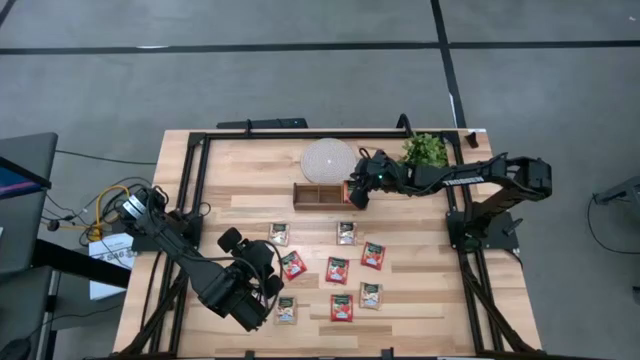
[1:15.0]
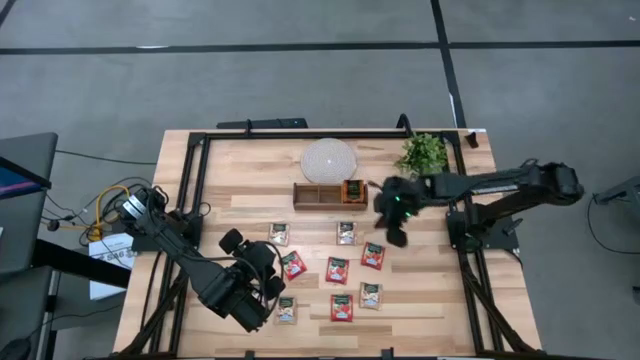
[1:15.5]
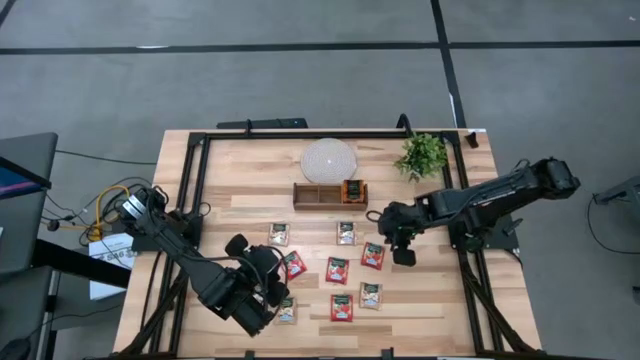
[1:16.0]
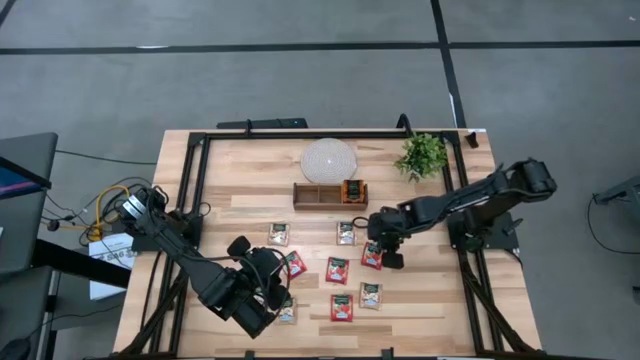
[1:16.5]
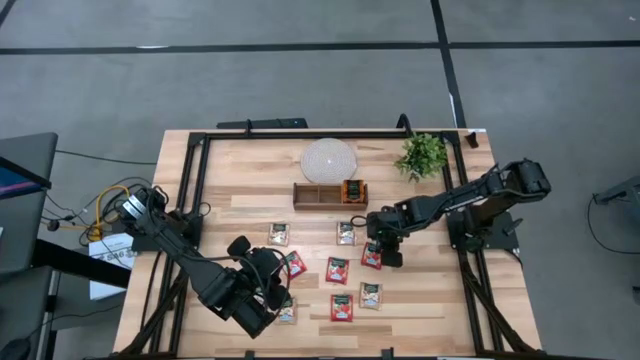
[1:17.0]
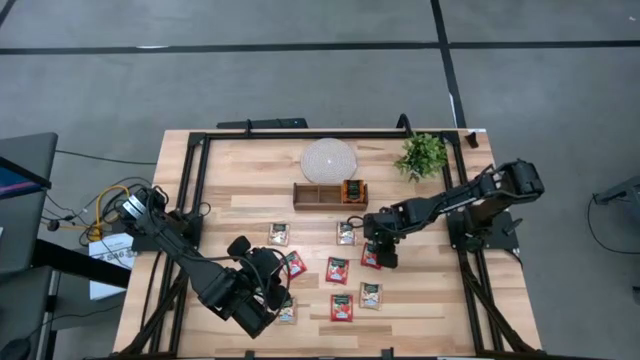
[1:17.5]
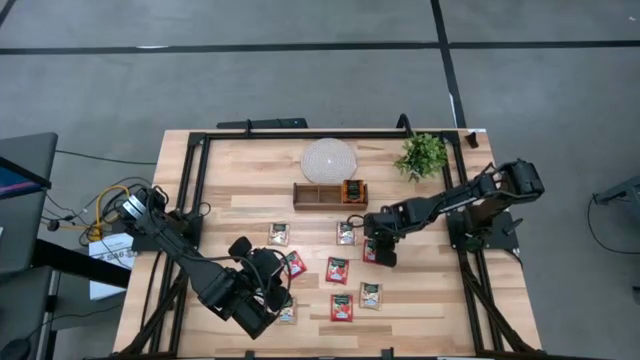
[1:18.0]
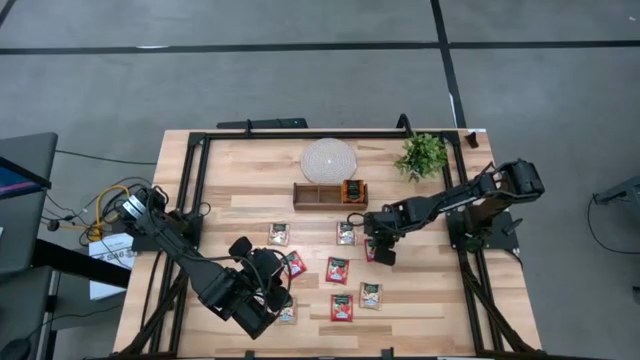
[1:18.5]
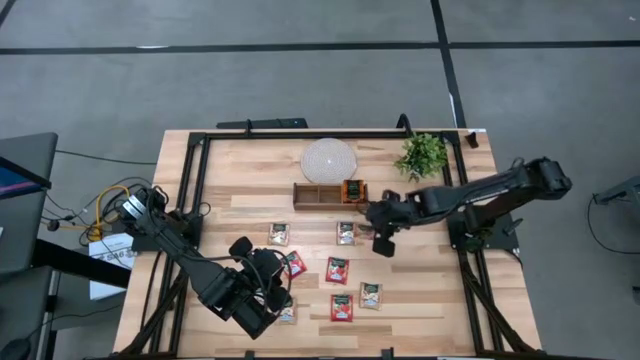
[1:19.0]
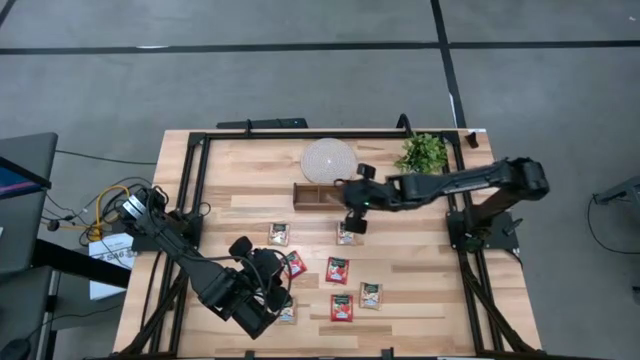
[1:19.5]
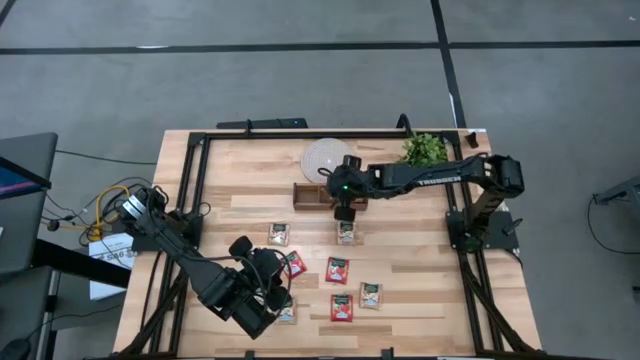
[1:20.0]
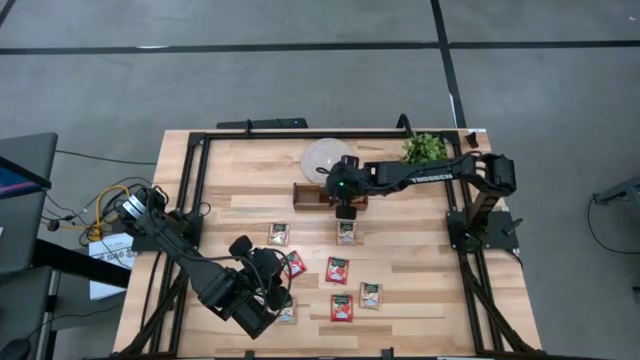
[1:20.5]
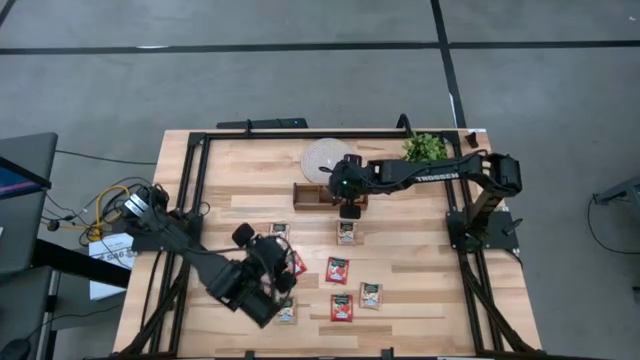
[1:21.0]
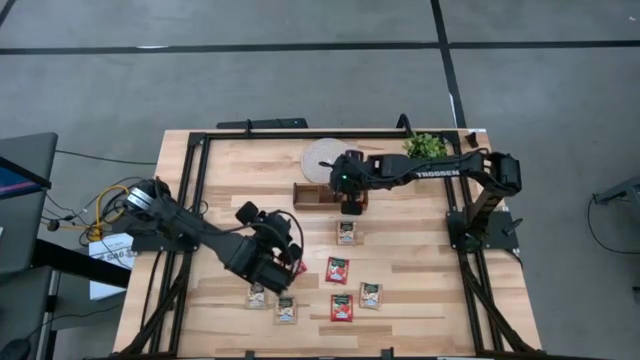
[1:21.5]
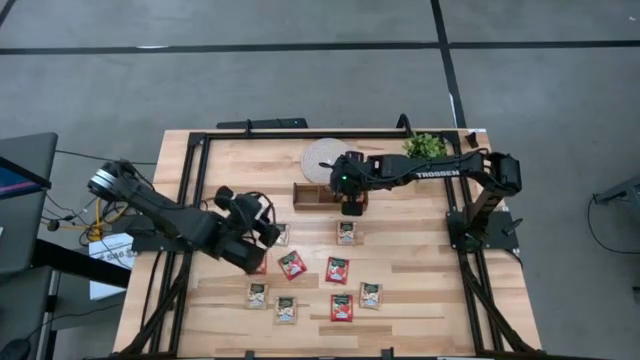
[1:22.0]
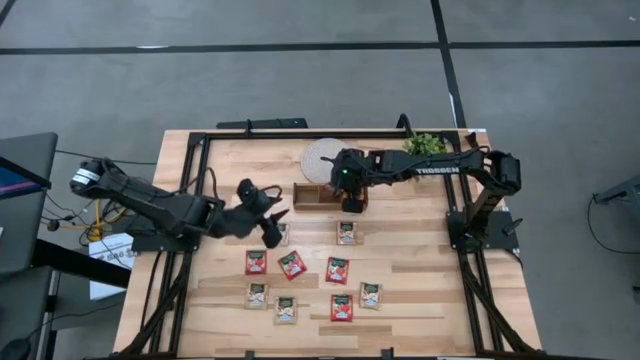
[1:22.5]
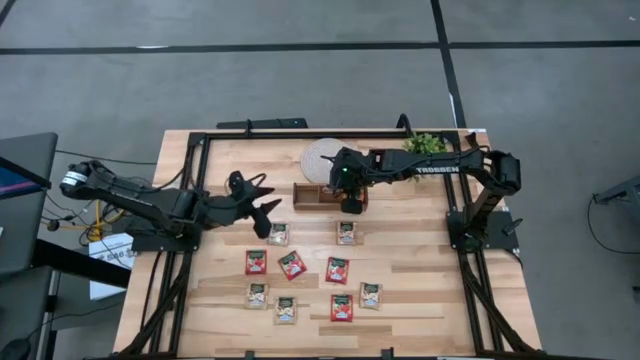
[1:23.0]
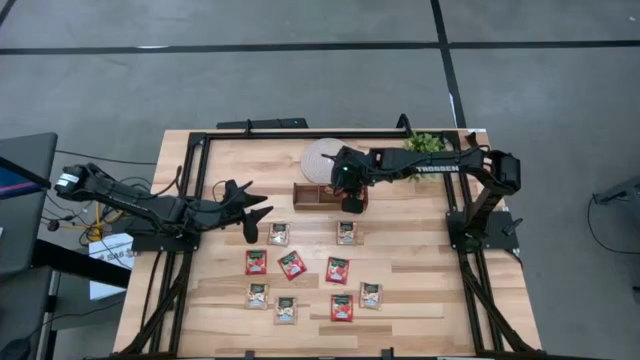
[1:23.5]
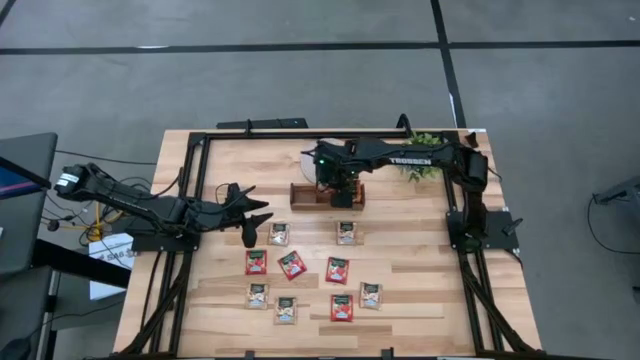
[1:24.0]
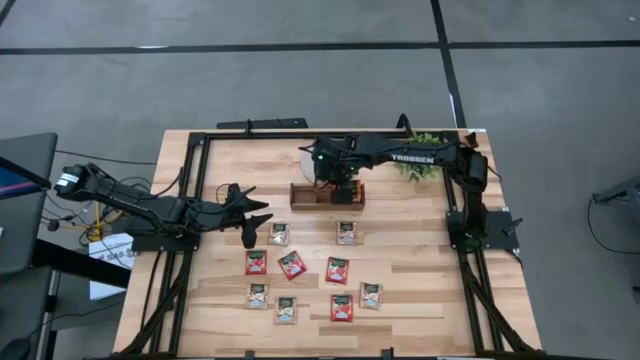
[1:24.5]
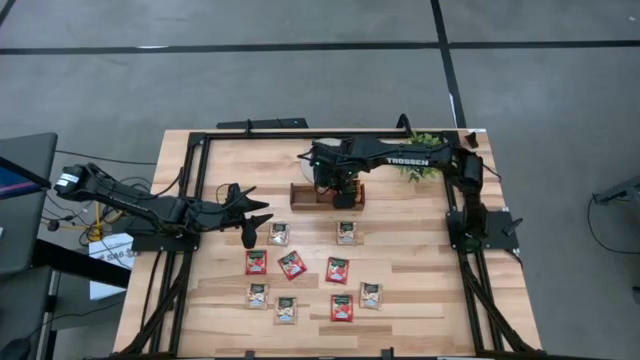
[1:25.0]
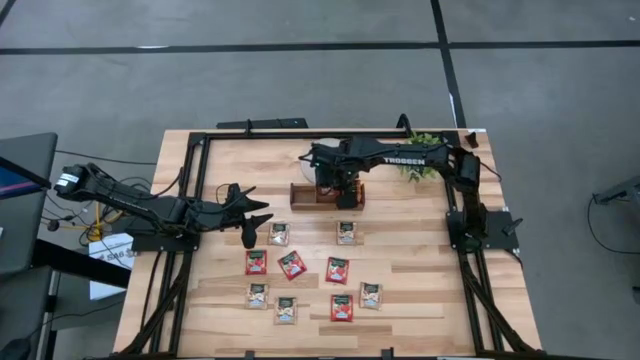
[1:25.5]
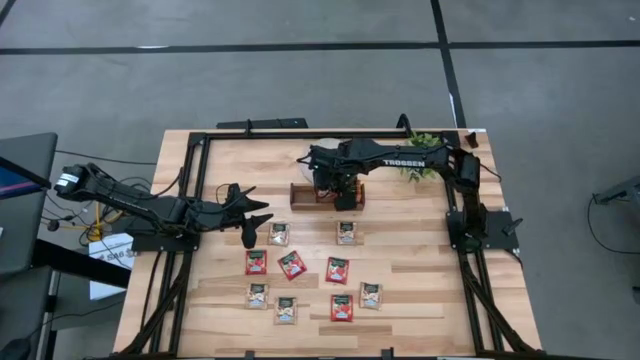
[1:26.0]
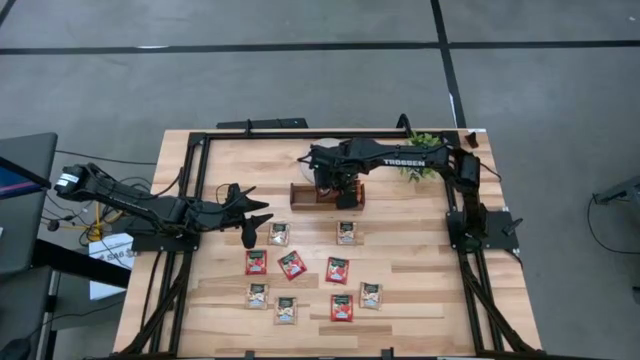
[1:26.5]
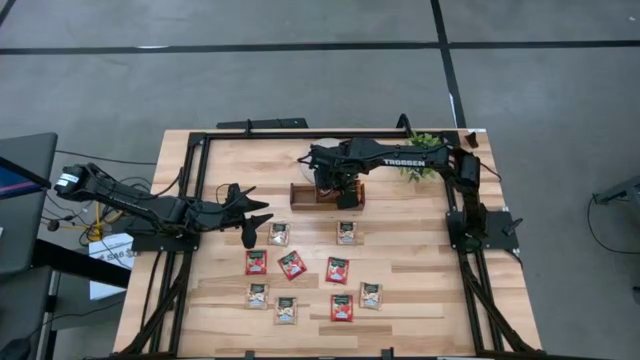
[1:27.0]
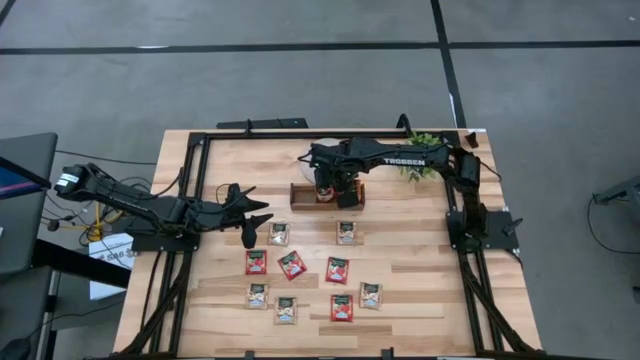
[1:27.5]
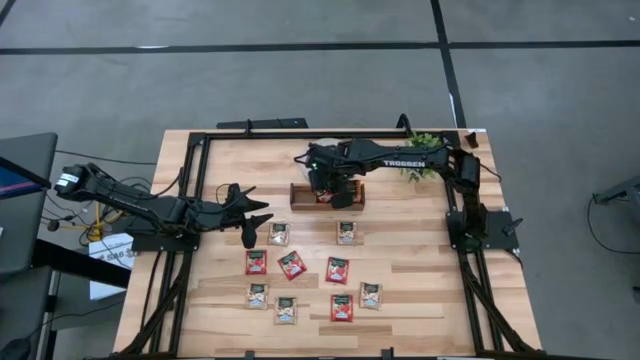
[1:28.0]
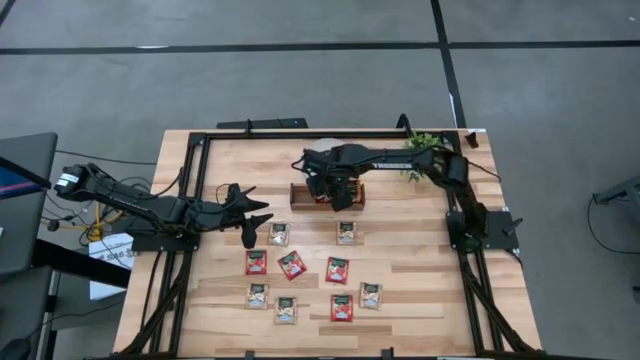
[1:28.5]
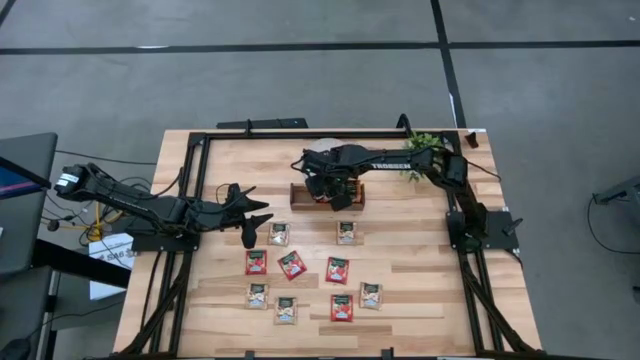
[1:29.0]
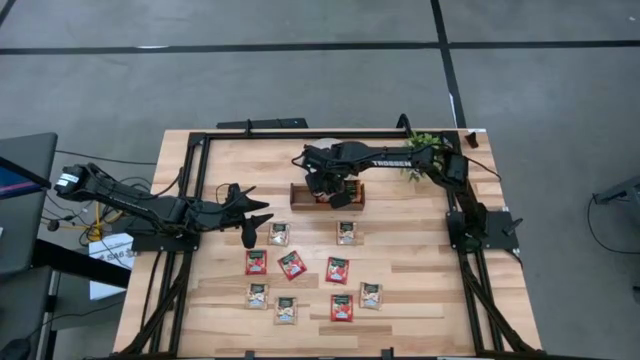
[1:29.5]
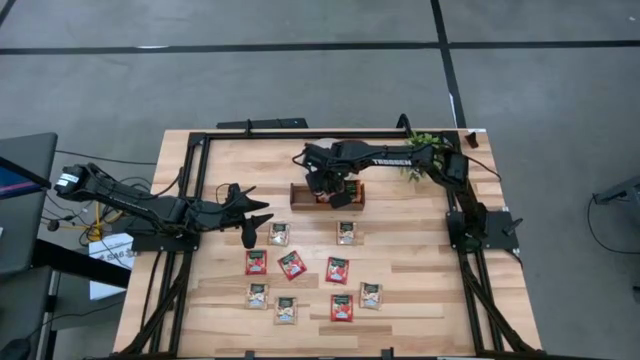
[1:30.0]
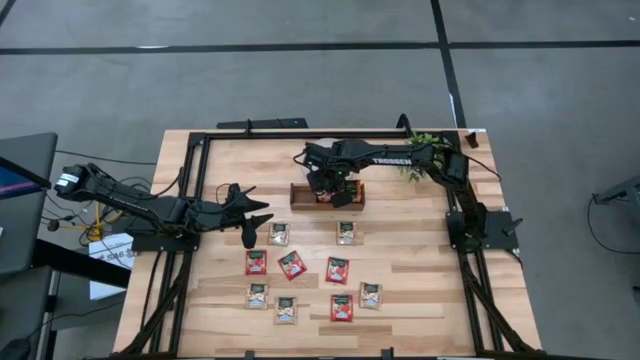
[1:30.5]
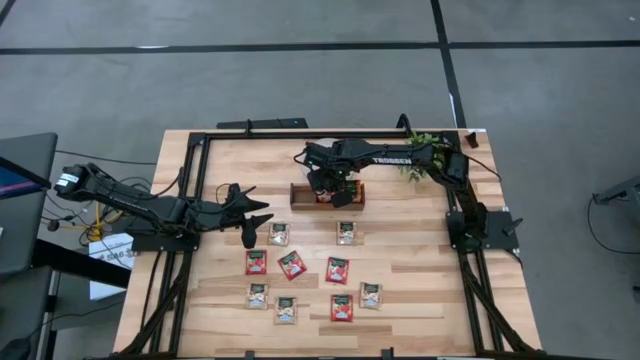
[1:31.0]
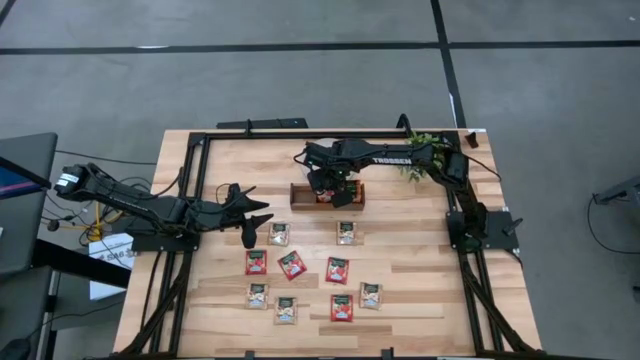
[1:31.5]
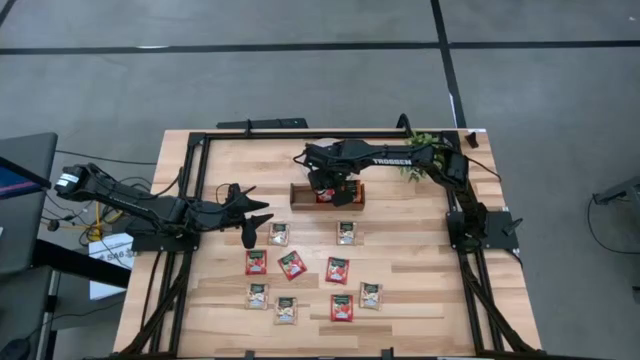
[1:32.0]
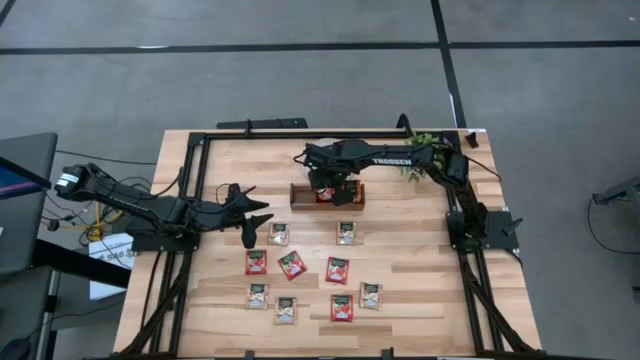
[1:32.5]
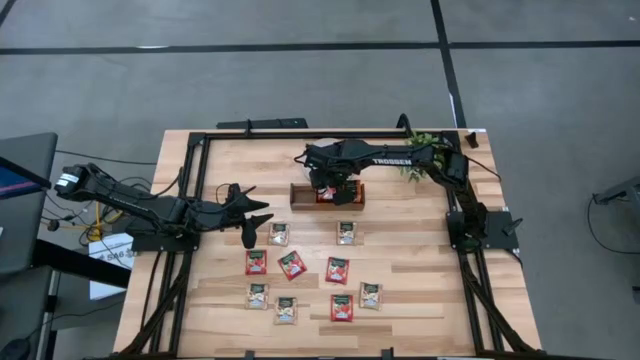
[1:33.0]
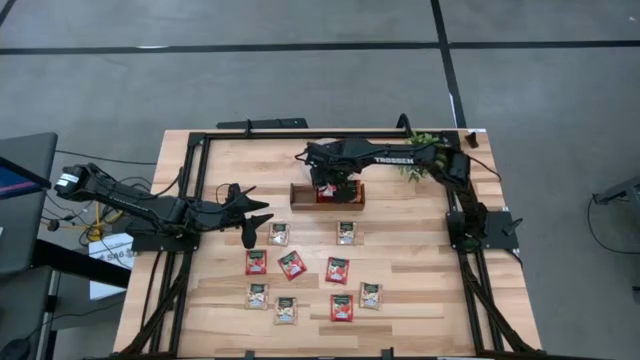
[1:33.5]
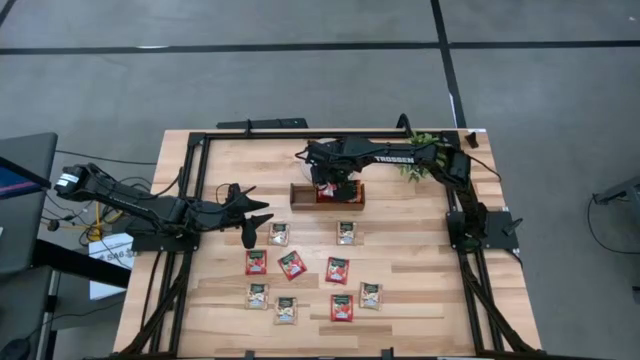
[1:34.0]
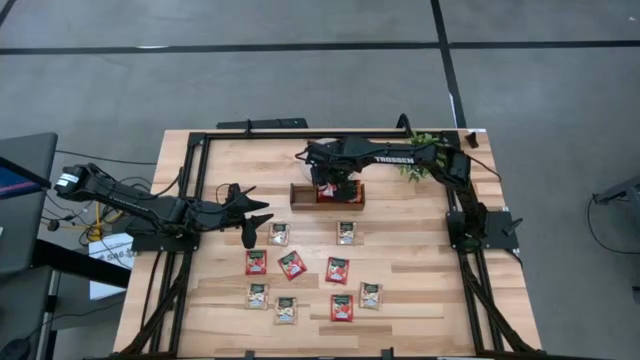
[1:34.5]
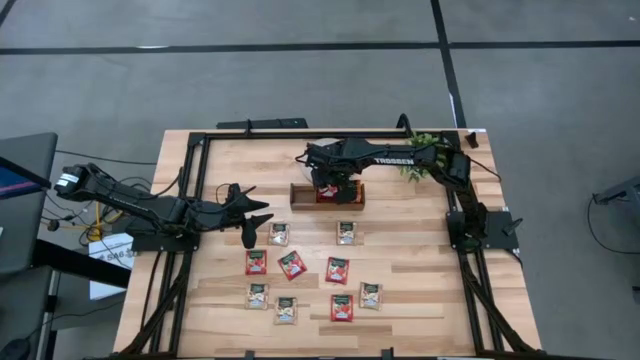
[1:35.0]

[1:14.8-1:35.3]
Task: Pick & Place Tea
Put the red tea bag into the middle compartment of the wooden organizer

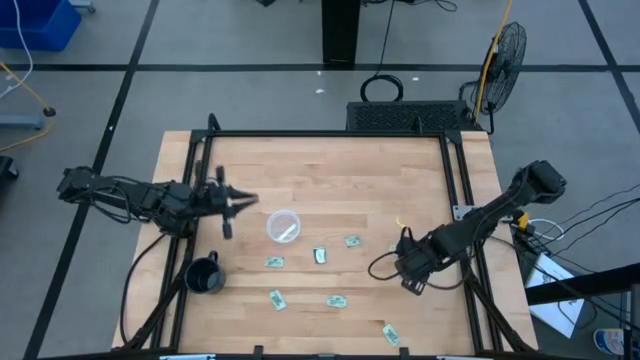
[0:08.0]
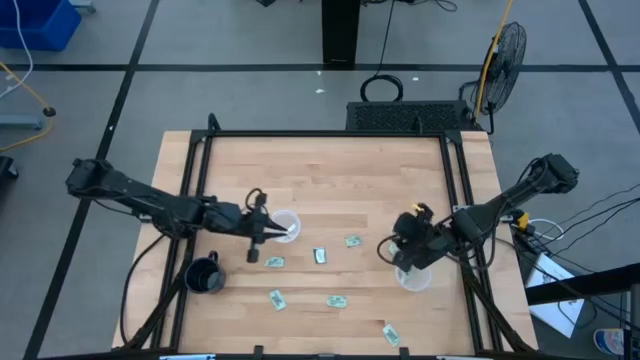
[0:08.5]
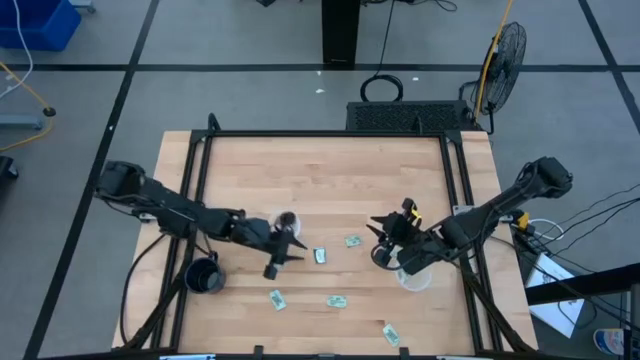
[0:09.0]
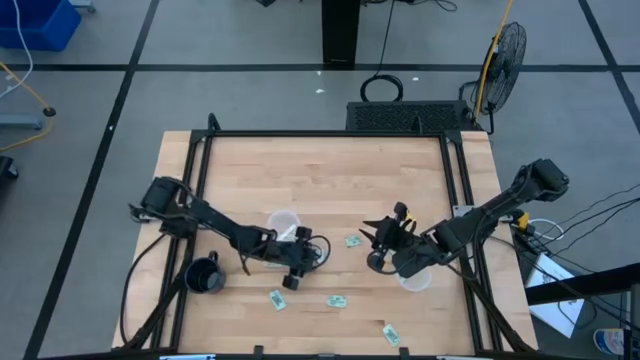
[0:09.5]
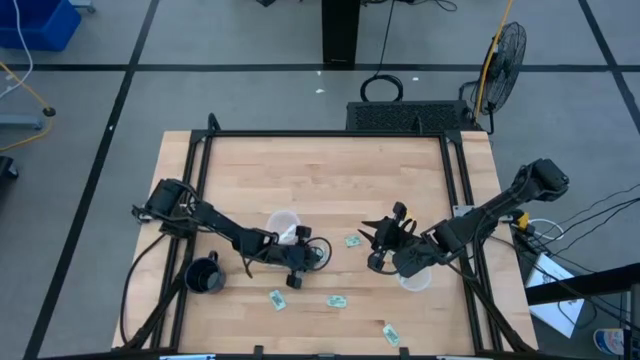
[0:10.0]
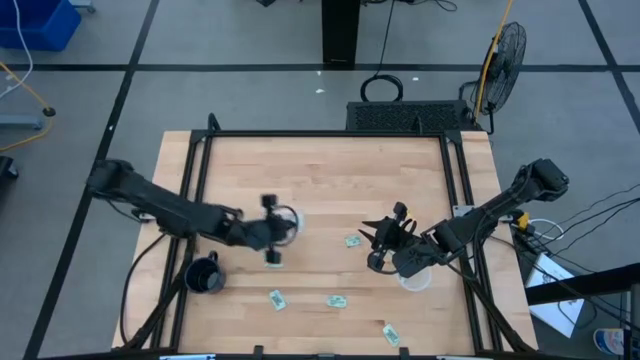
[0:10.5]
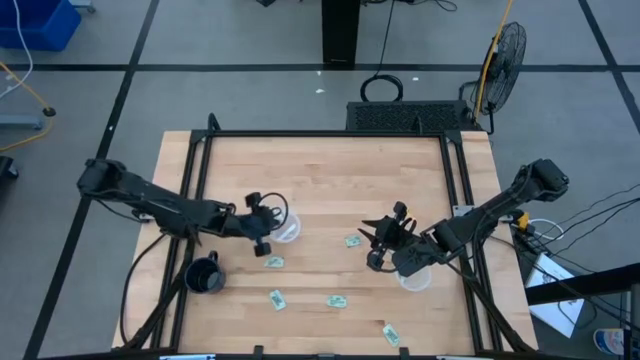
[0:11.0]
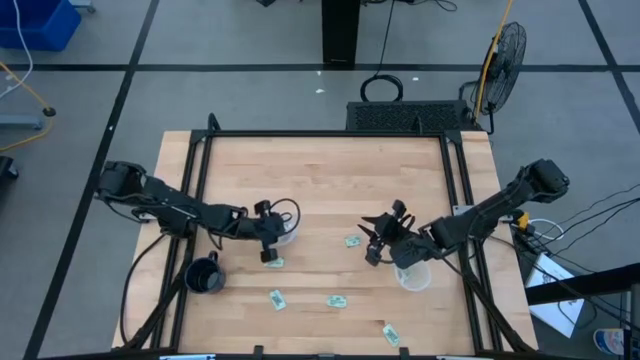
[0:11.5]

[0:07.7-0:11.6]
Task: Pick and place Stevia / Truvia into bins
Put the dark green stevia packet into the left transparent container
